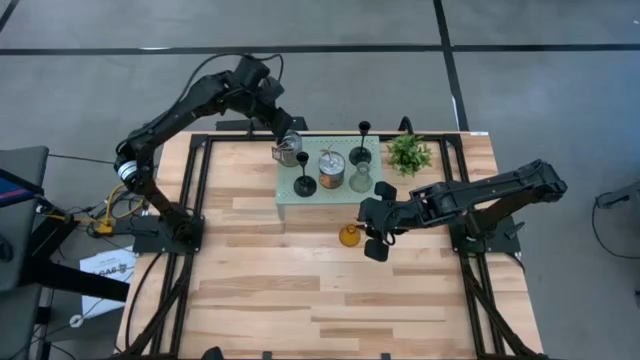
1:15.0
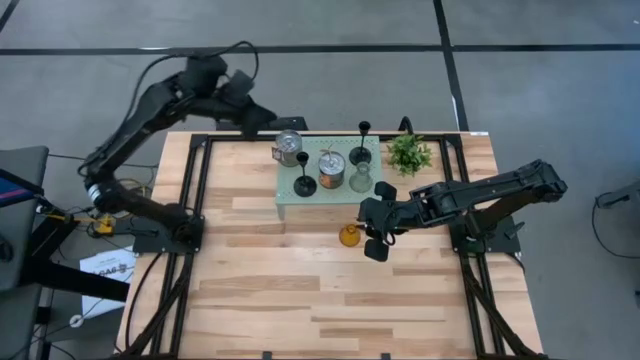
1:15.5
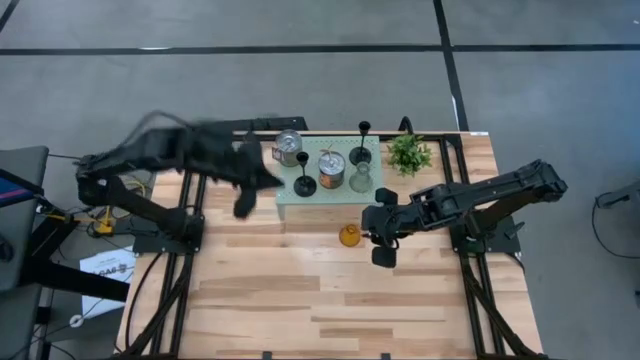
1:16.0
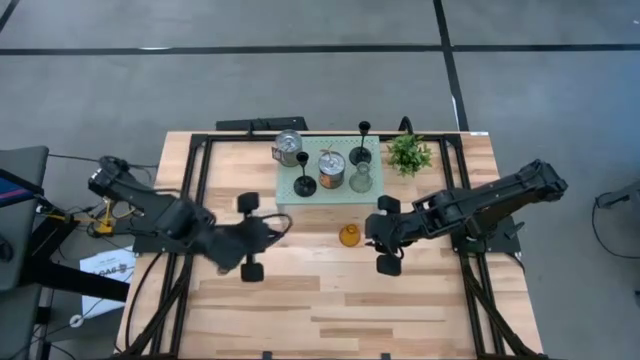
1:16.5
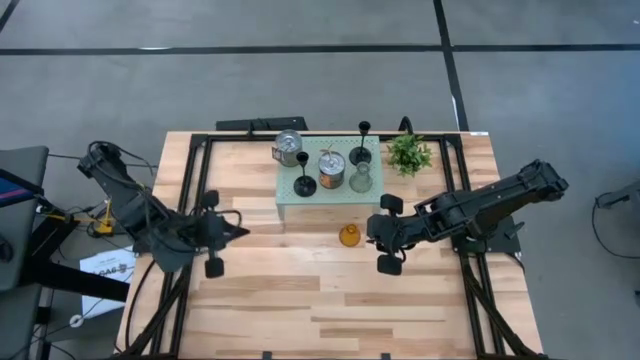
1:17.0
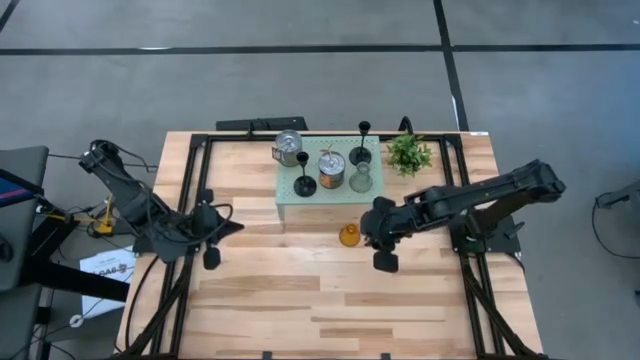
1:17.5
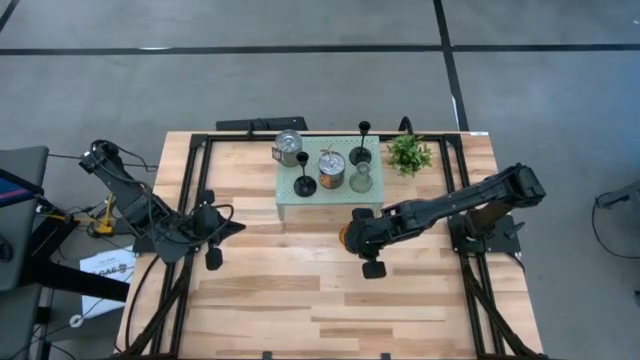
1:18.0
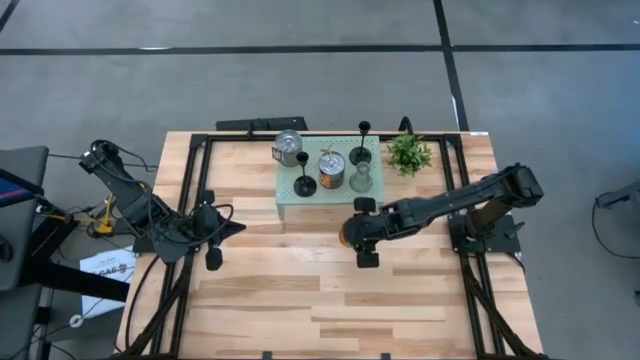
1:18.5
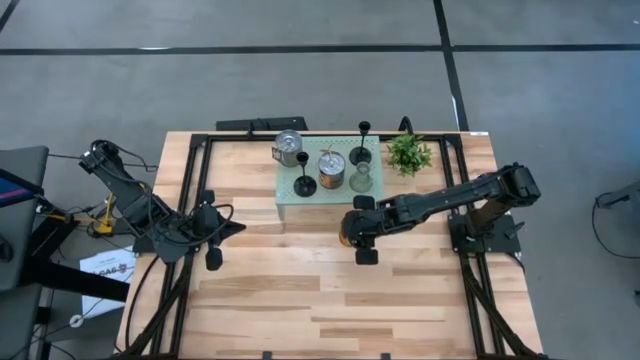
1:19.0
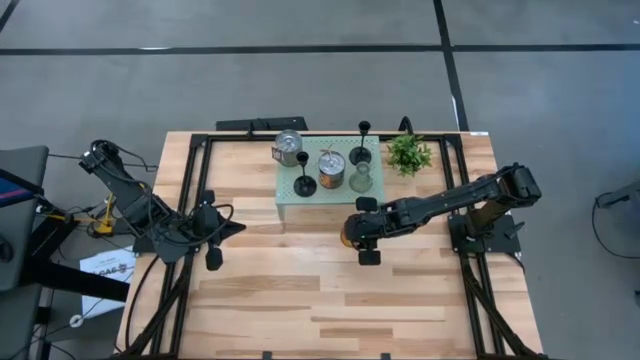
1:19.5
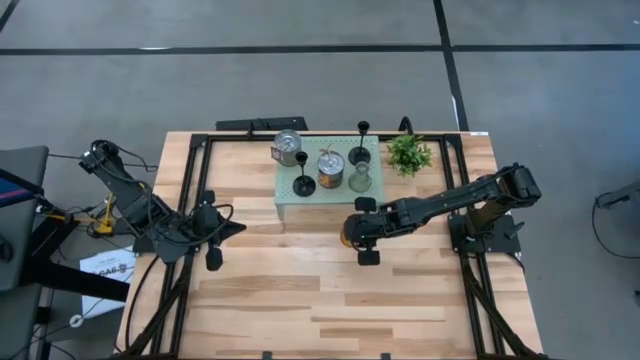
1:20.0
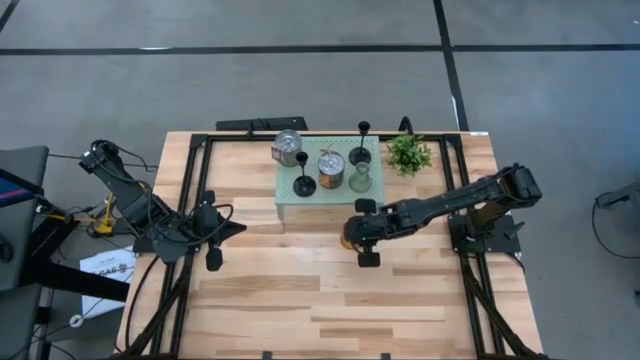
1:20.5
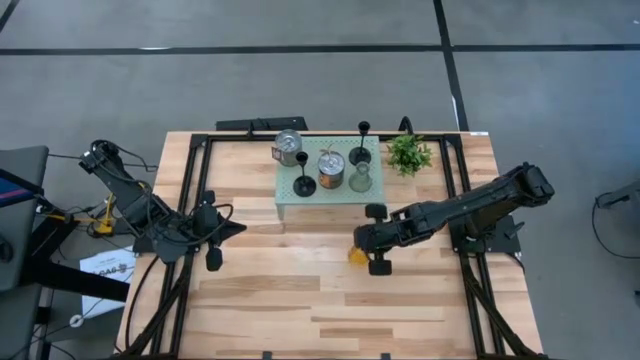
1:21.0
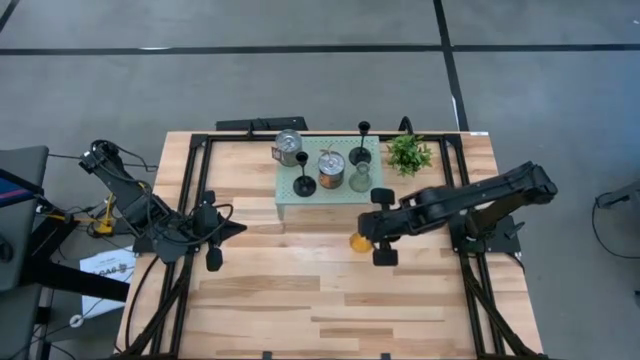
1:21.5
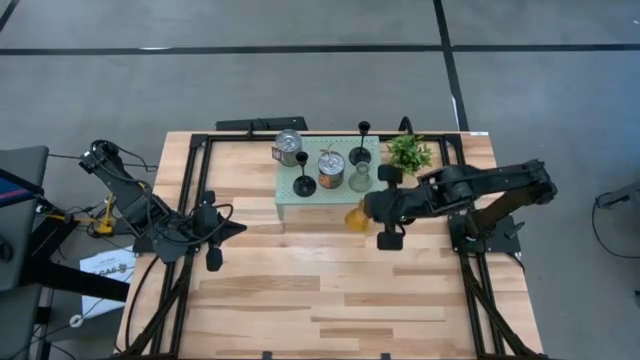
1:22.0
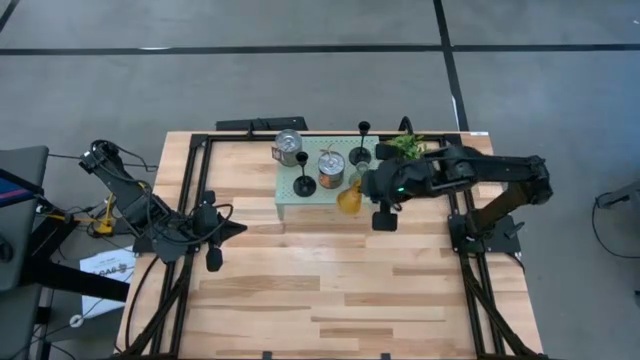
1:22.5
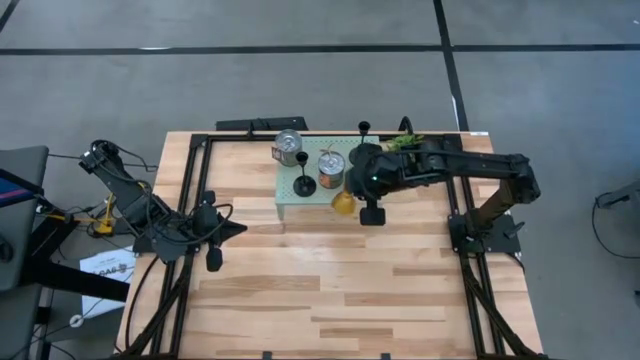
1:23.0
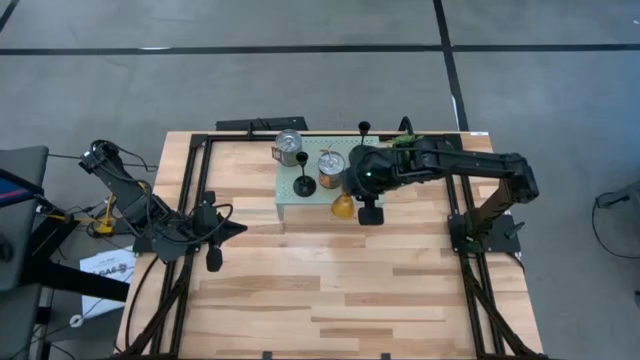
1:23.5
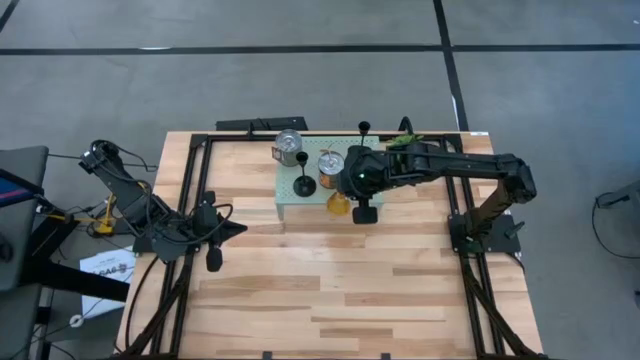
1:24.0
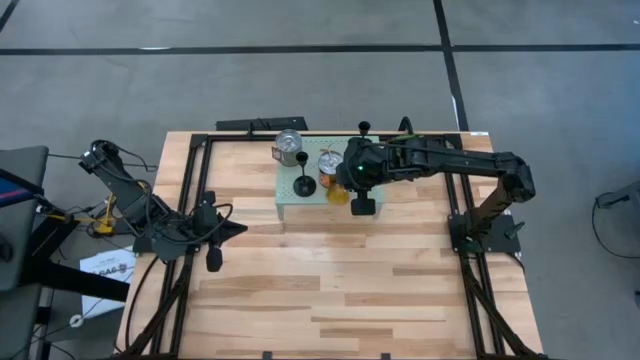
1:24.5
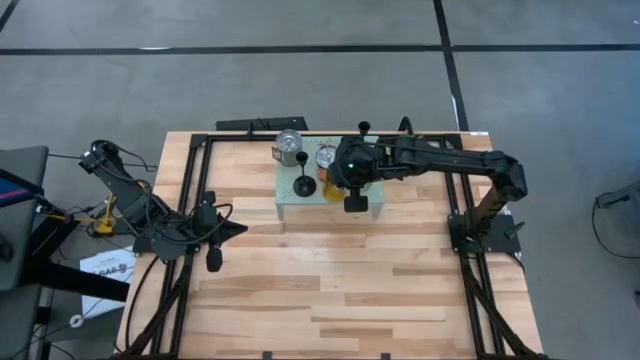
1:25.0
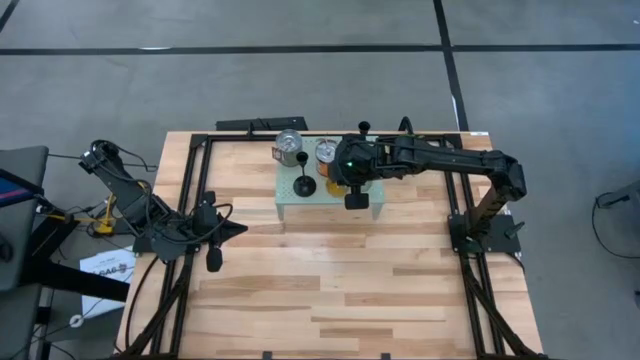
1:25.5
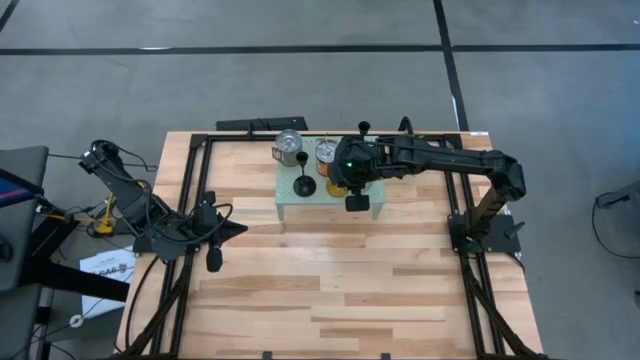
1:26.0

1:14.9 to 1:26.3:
Task: Pick & Place candle stick holders
Put the orange glass candle holder on the shelf

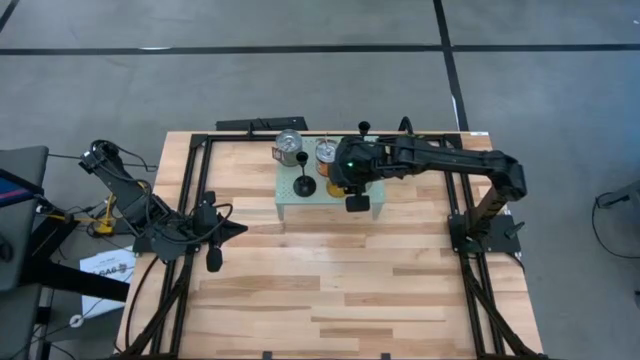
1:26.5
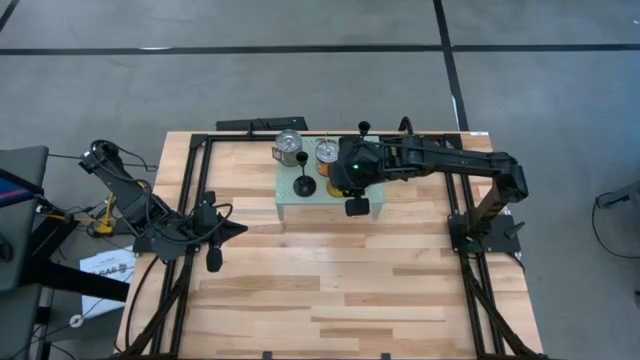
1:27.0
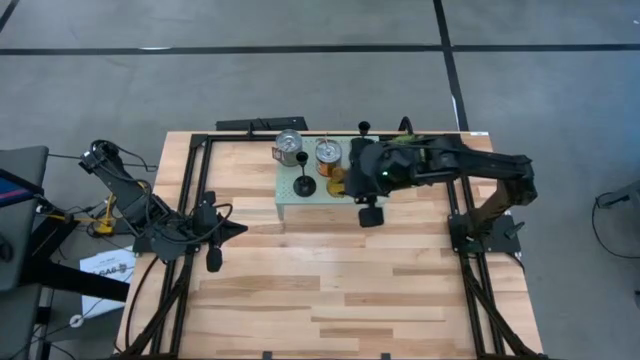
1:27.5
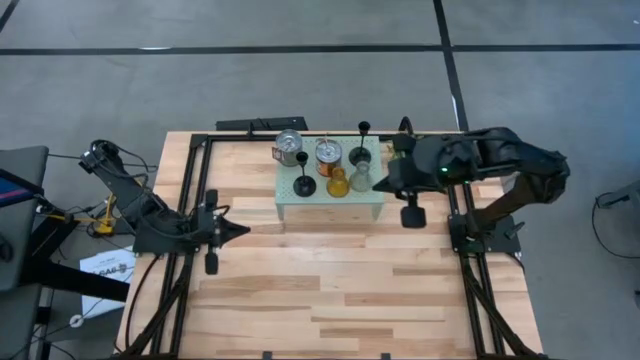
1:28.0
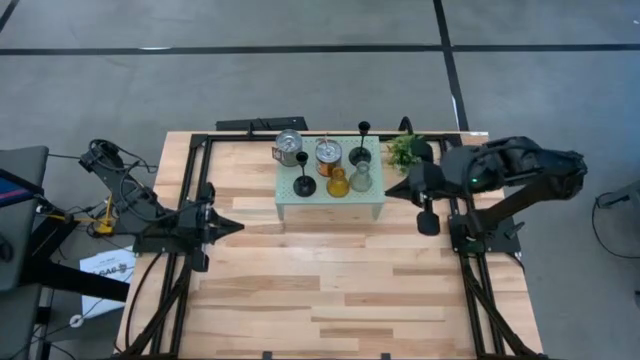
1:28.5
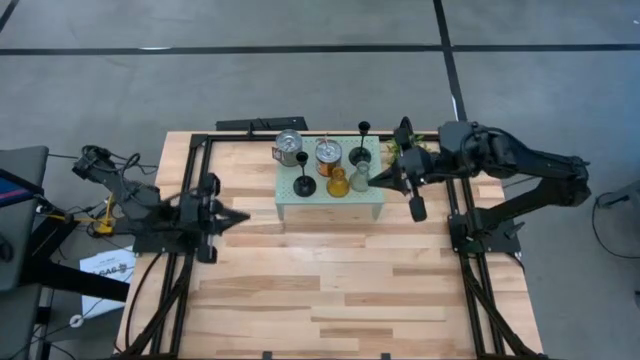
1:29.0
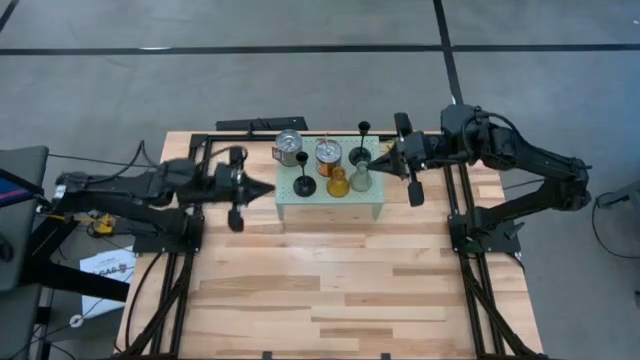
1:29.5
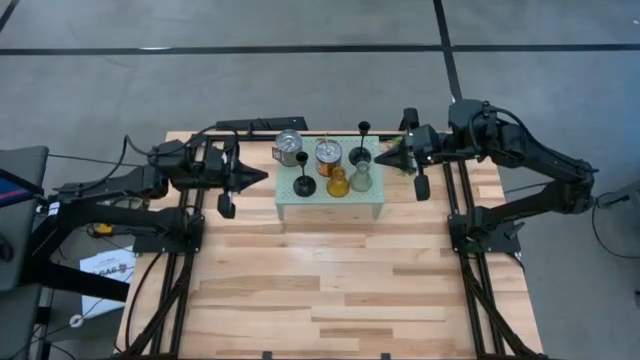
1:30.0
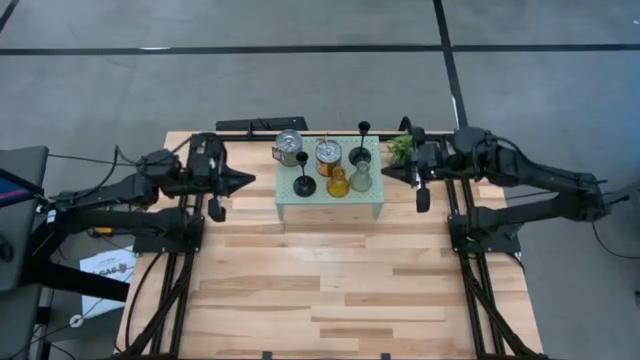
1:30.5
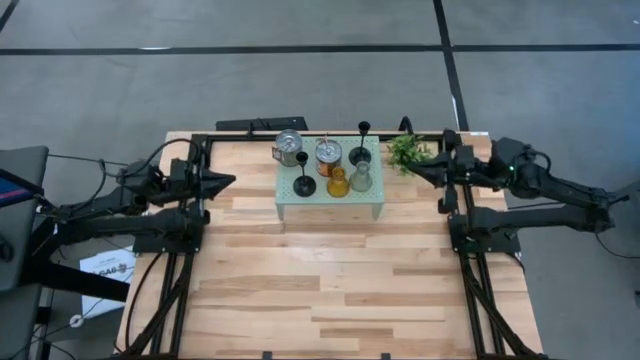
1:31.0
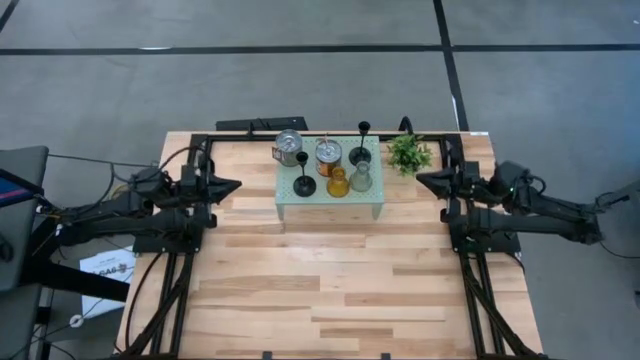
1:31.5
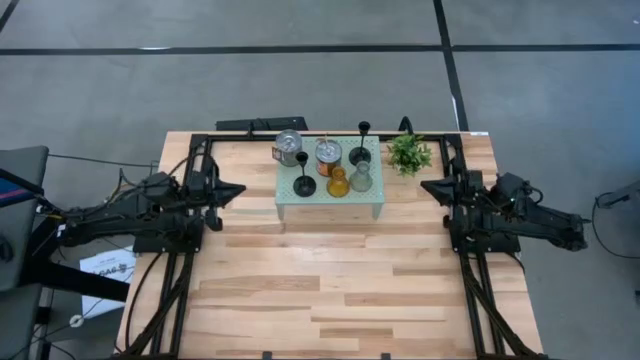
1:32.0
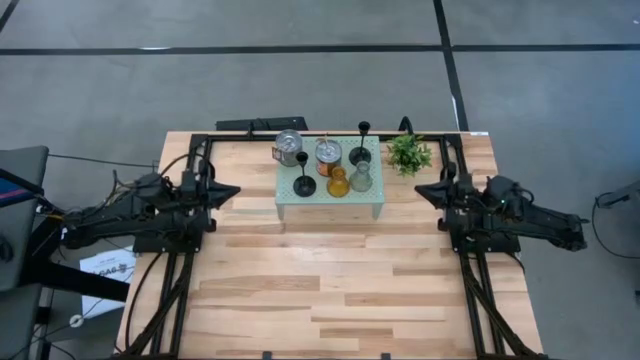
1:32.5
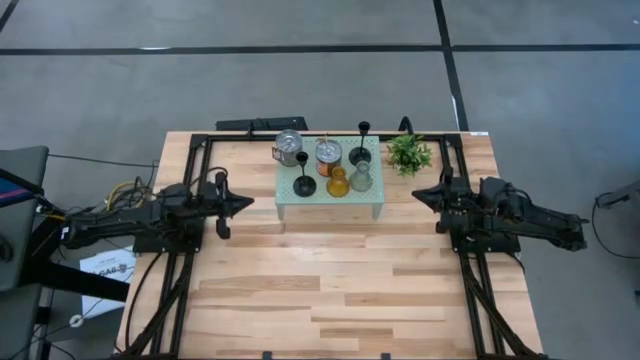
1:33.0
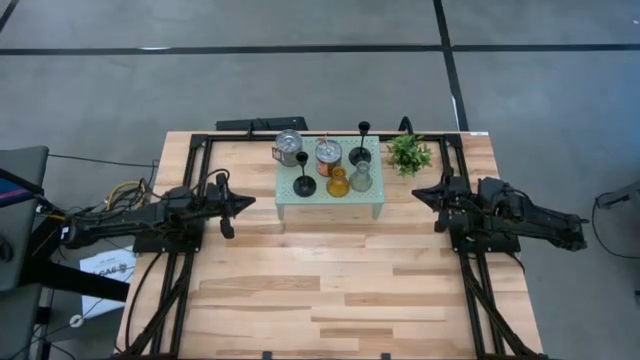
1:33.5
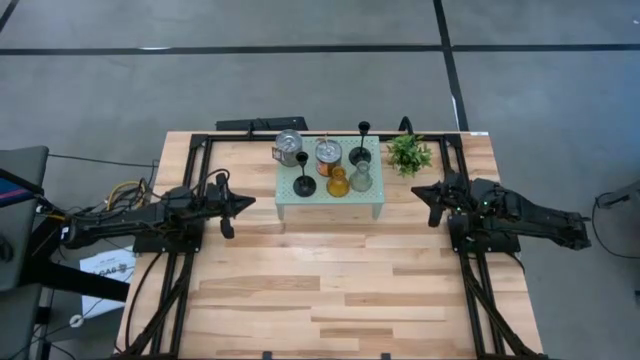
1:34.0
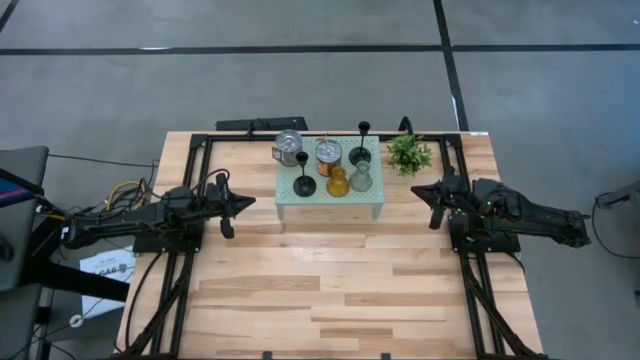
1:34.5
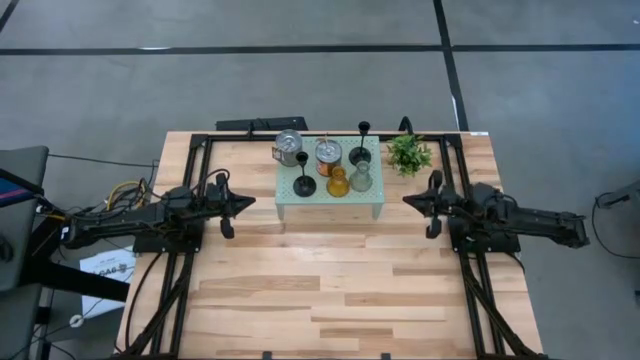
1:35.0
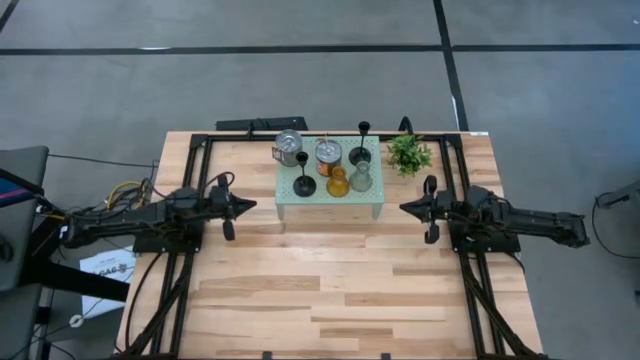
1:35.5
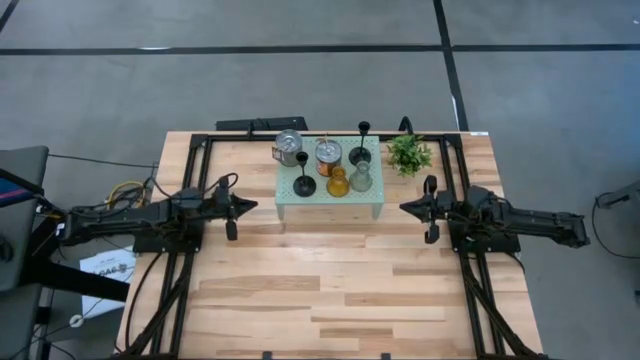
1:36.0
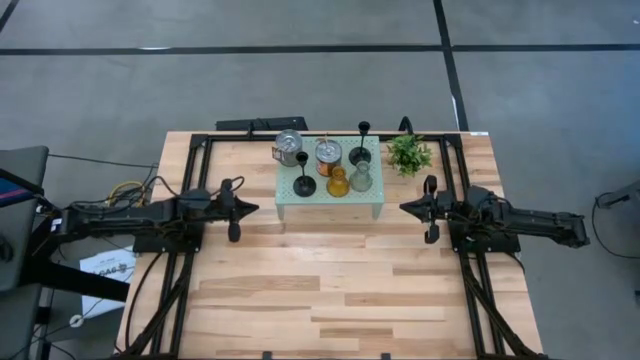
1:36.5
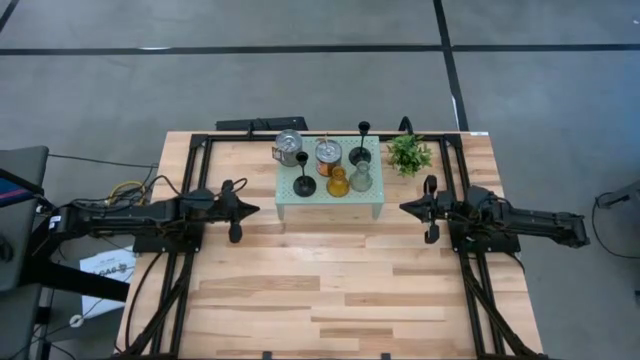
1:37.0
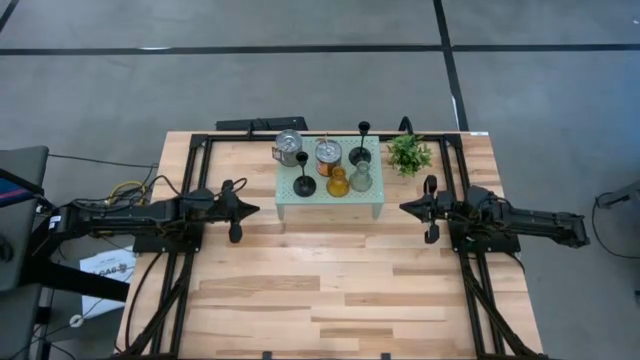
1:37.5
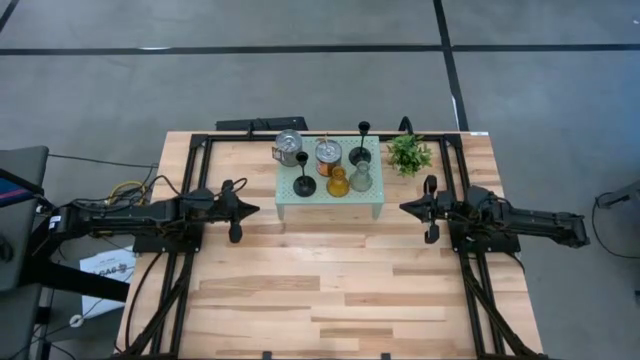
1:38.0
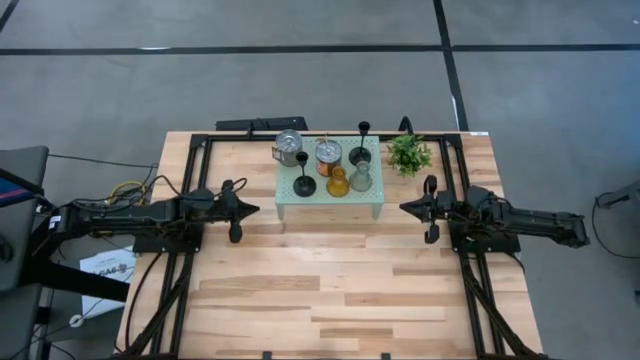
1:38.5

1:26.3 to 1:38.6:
Return to Home Position
